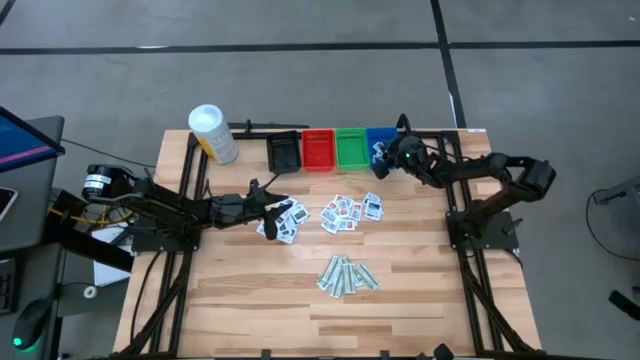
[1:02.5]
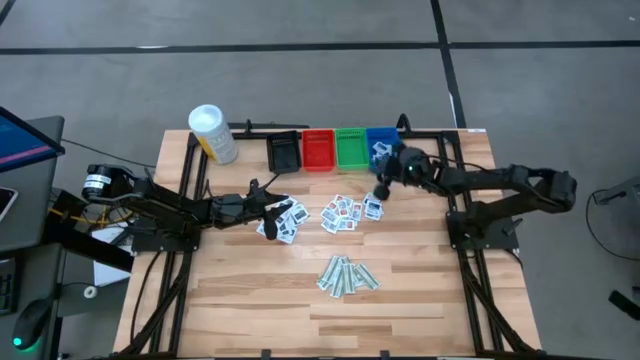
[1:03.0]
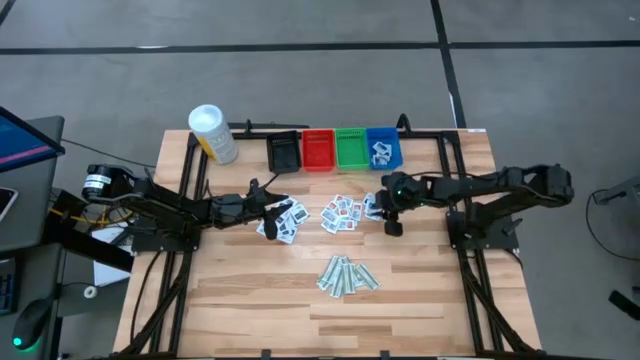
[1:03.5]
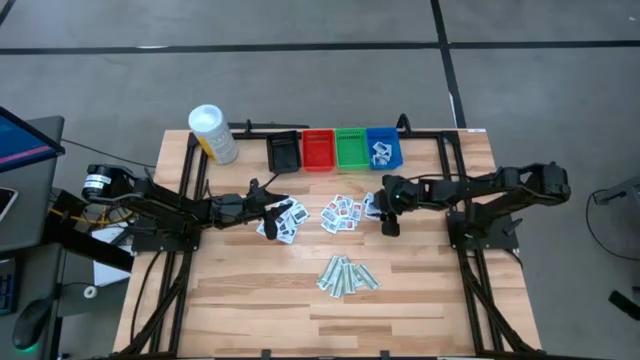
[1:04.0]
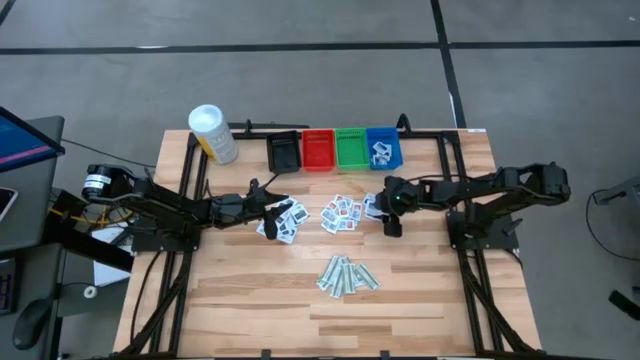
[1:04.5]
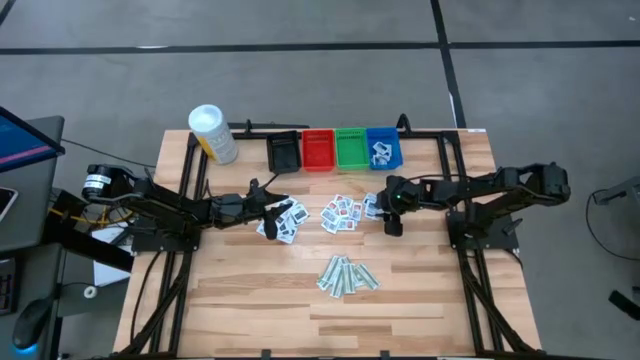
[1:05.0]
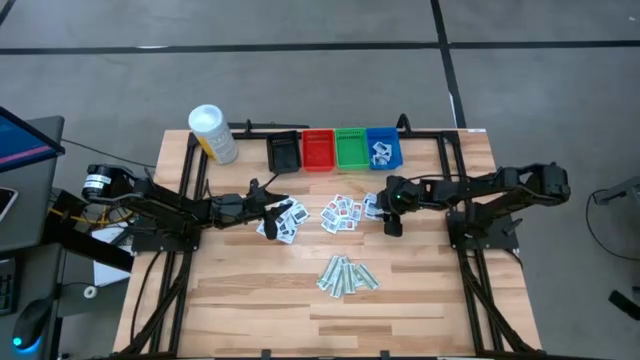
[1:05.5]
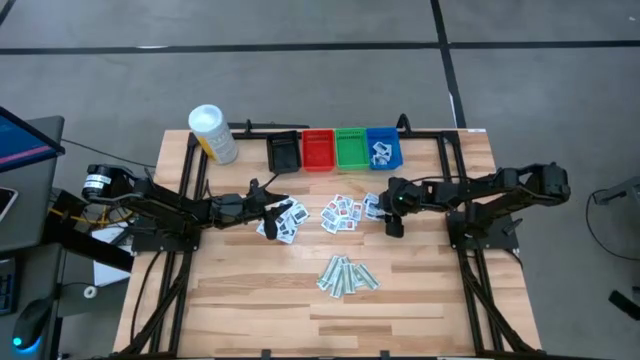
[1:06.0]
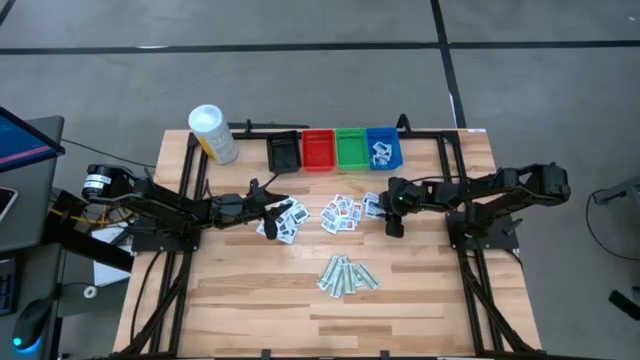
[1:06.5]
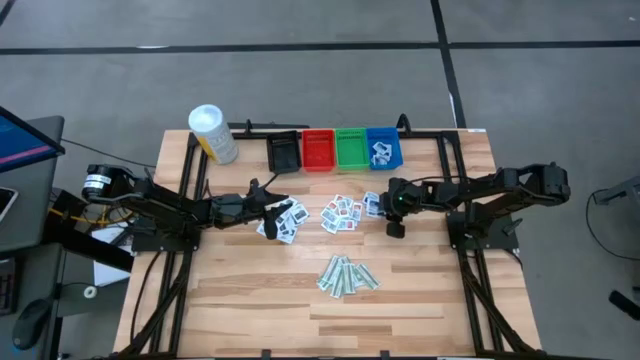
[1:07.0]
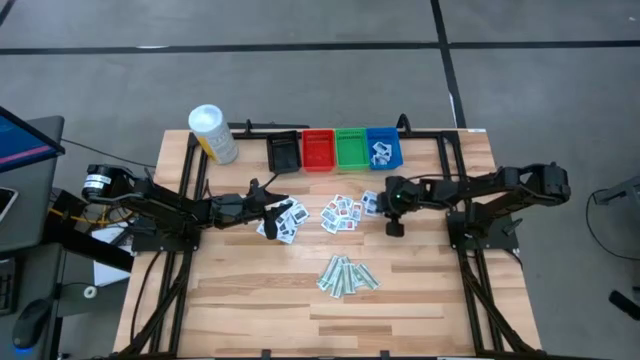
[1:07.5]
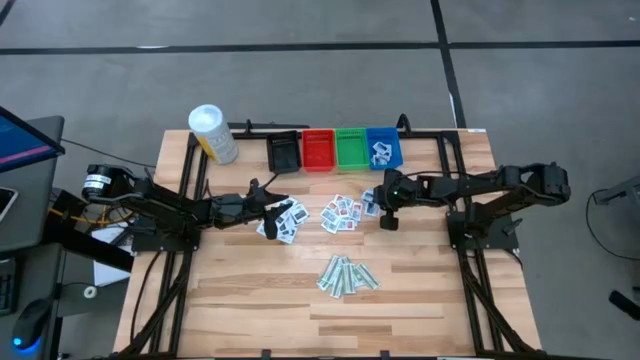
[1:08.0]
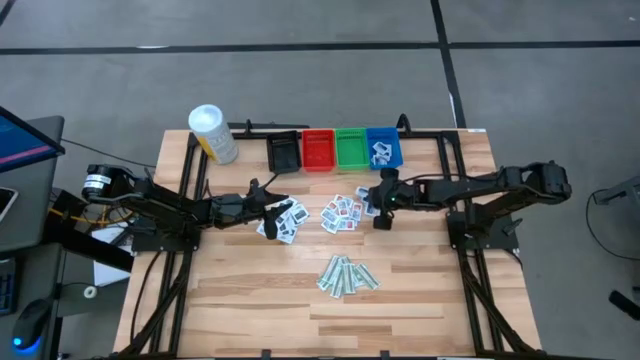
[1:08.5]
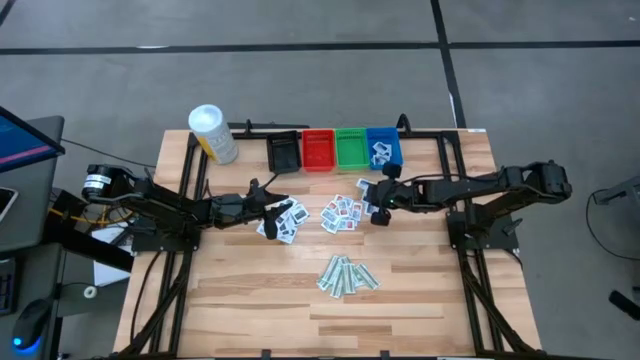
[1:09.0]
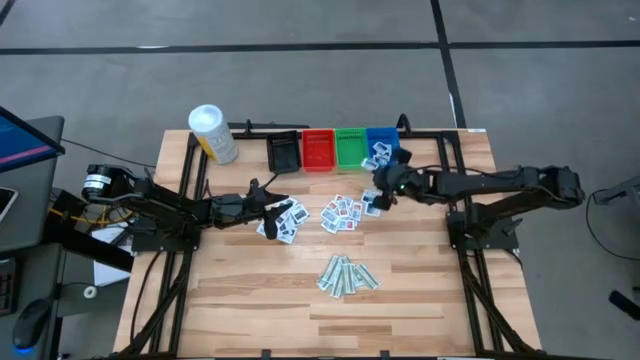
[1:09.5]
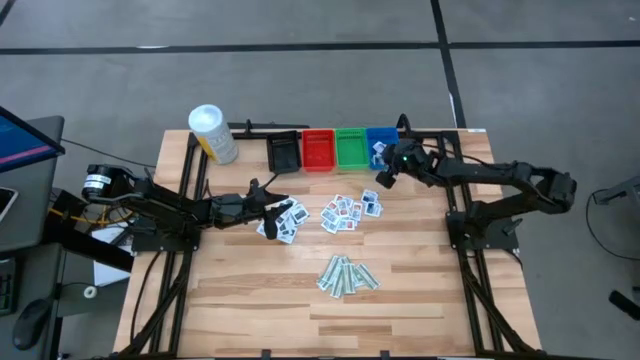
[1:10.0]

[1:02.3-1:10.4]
Task: Pick & Place First Aid Supplies
Put the blue alcohol pad into the blue bin

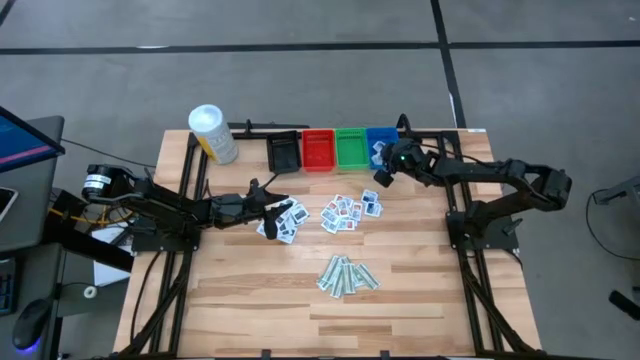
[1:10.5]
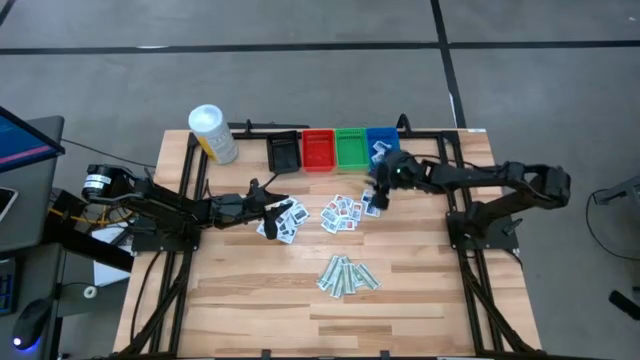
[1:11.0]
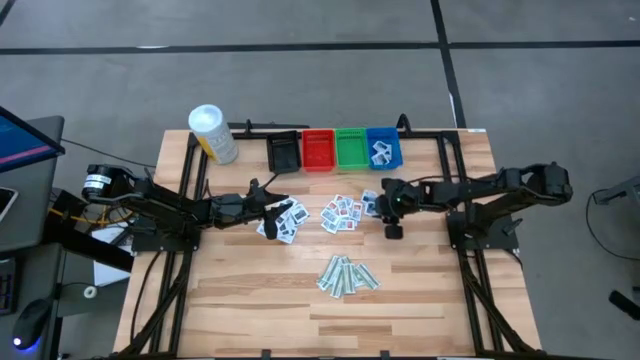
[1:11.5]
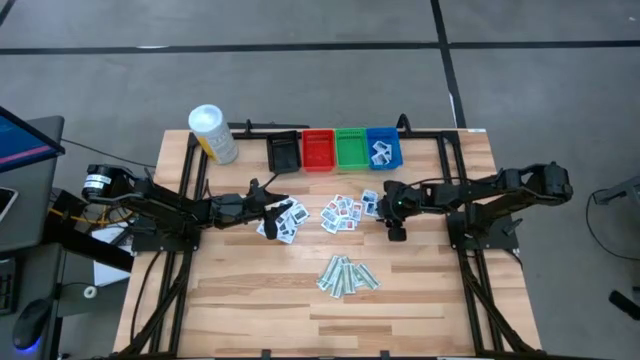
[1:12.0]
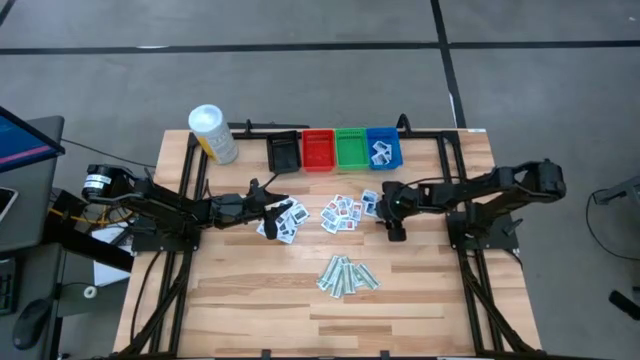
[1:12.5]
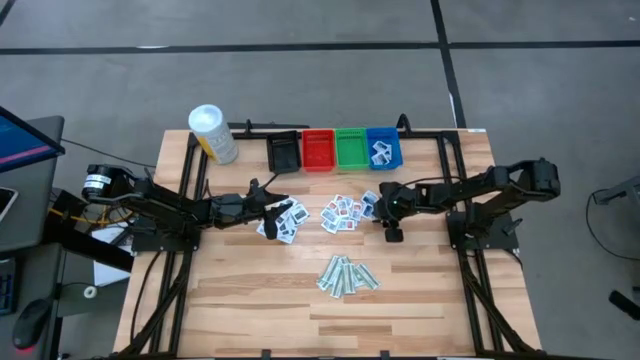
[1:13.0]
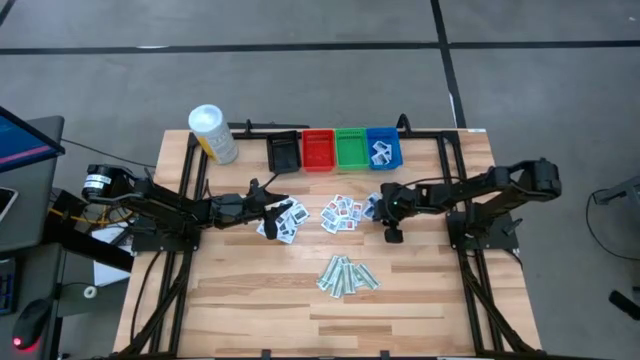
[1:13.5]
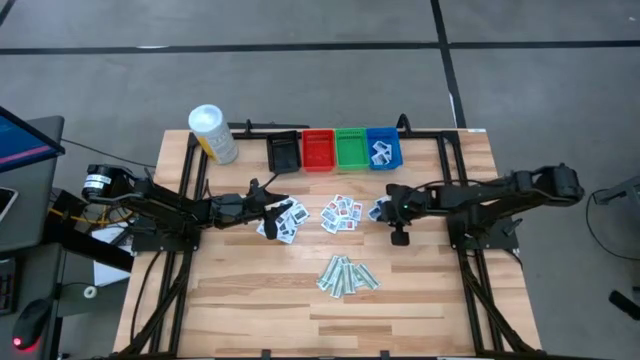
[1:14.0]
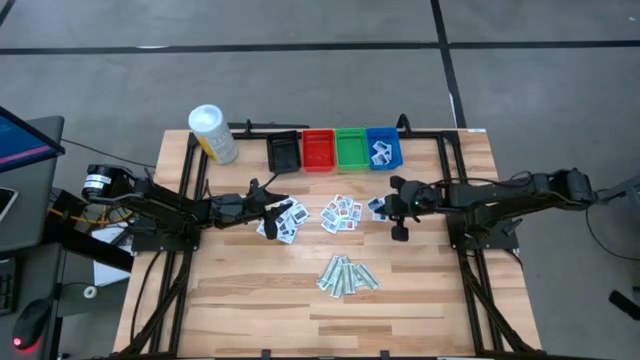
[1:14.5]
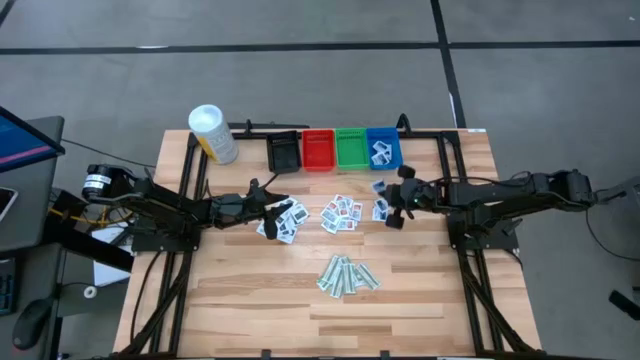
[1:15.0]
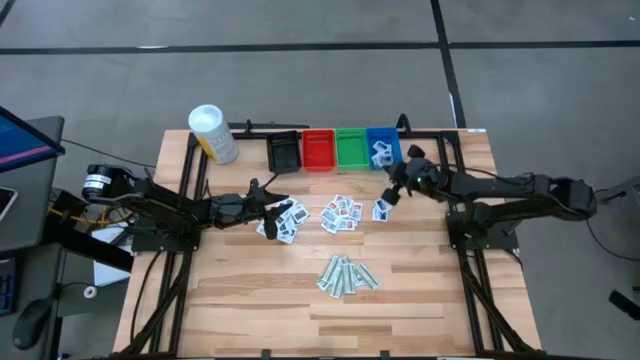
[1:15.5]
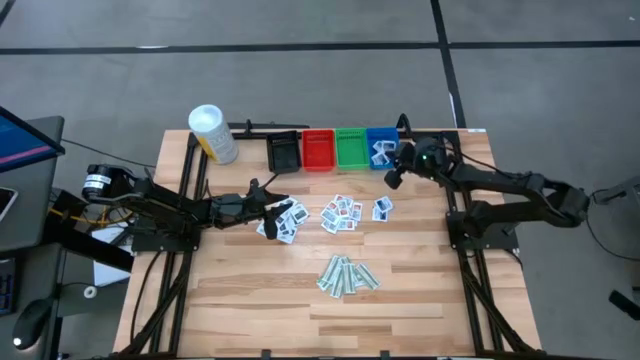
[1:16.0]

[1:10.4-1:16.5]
Put the blue alcohol pad into the blue bin

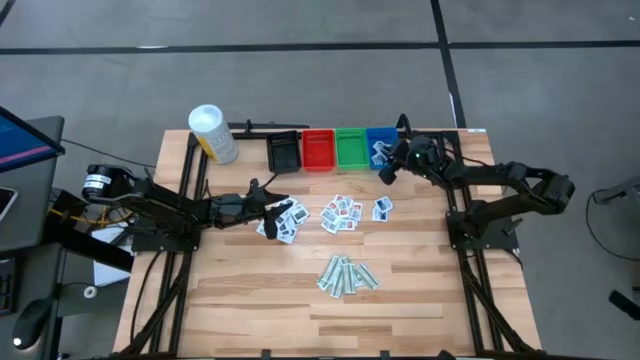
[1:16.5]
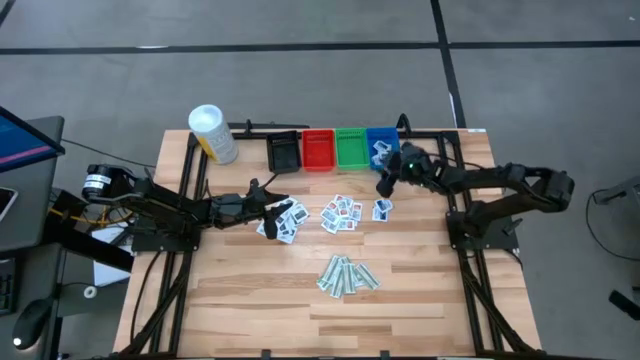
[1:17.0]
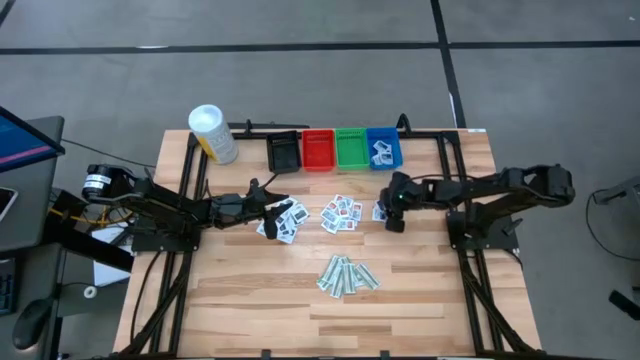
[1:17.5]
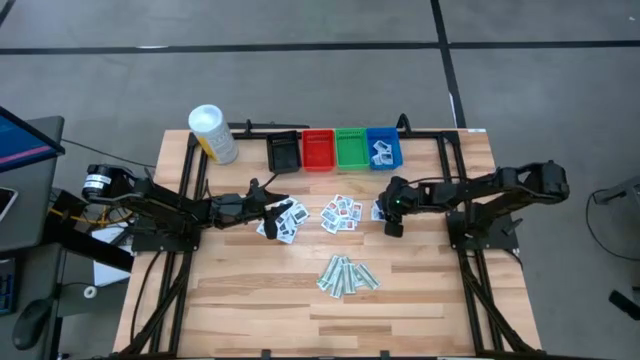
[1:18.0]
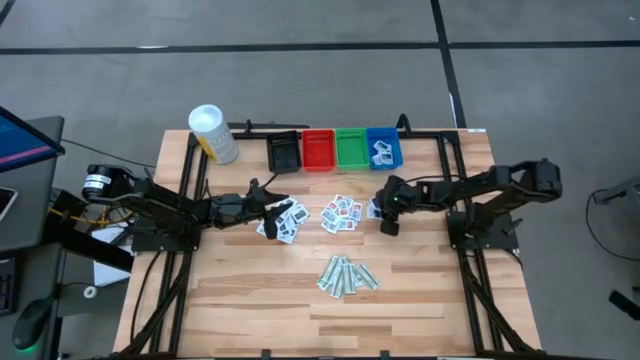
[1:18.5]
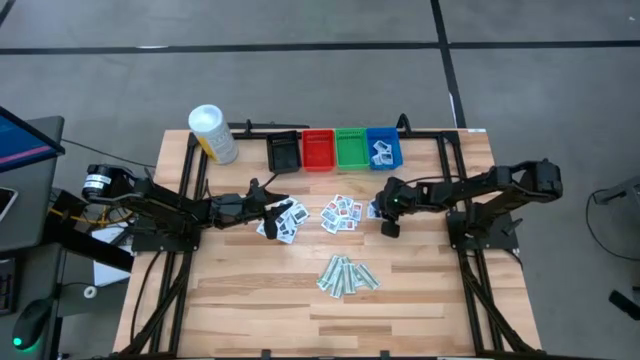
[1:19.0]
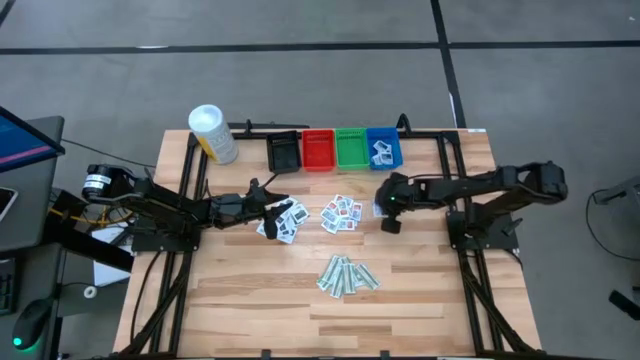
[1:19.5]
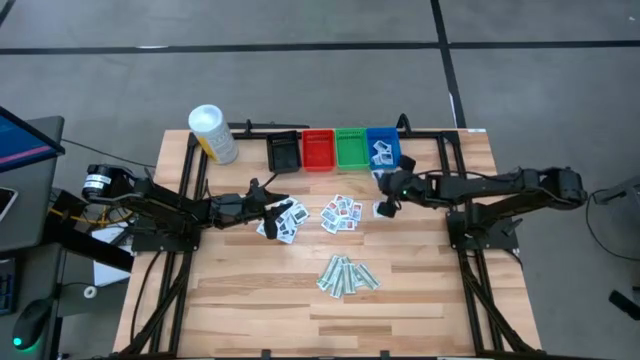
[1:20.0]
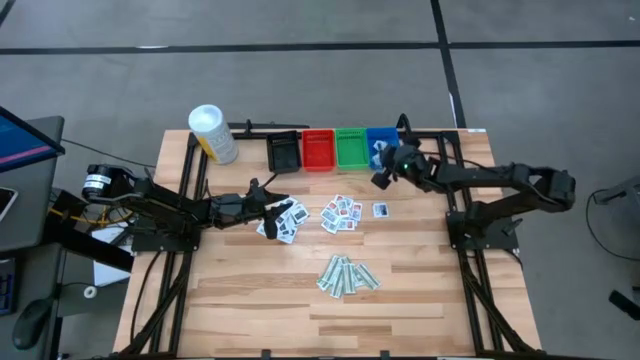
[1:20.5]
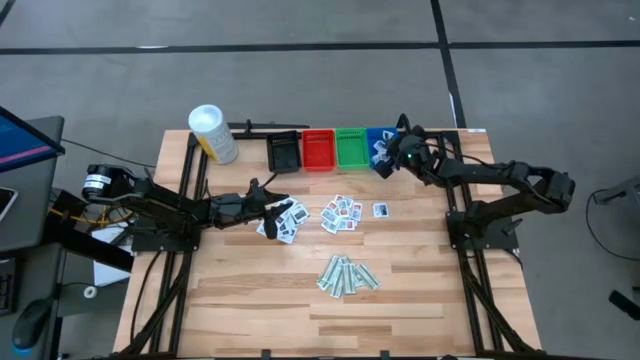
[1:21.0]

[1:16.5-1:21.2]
Put the blue alcohol pad into the blue bin

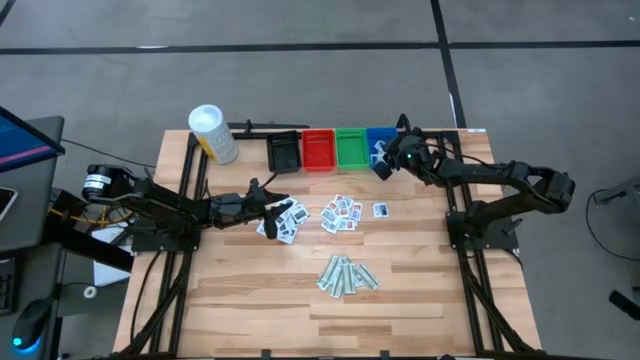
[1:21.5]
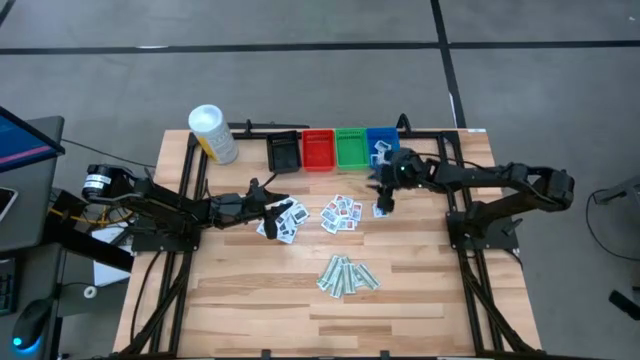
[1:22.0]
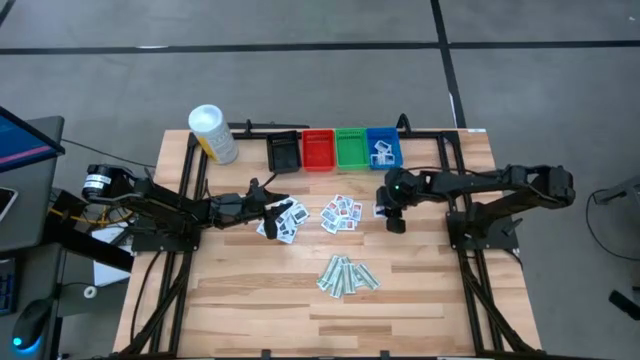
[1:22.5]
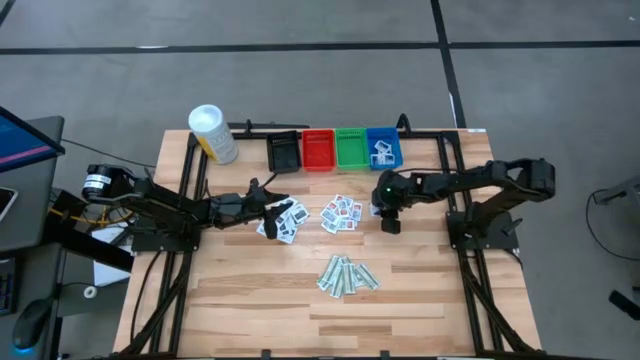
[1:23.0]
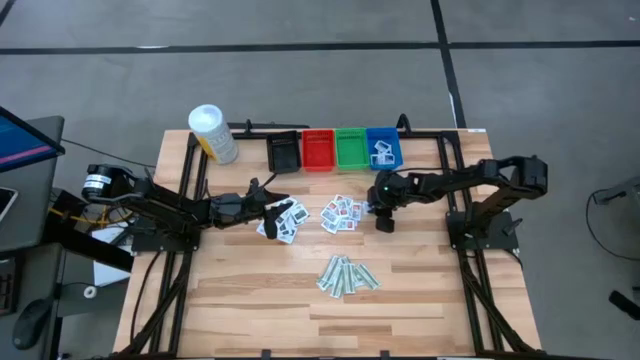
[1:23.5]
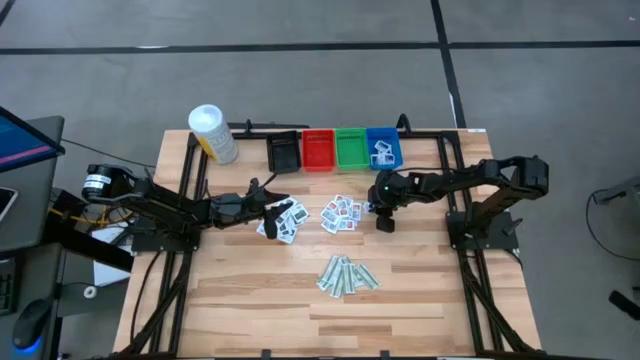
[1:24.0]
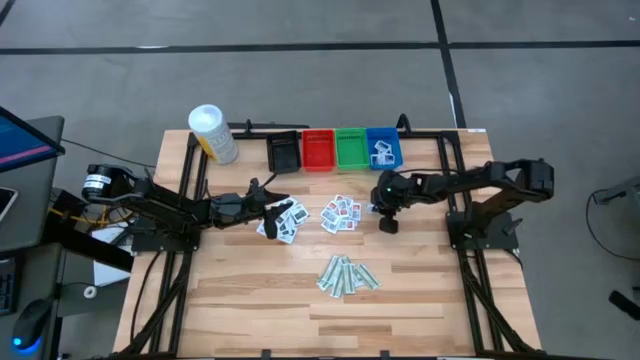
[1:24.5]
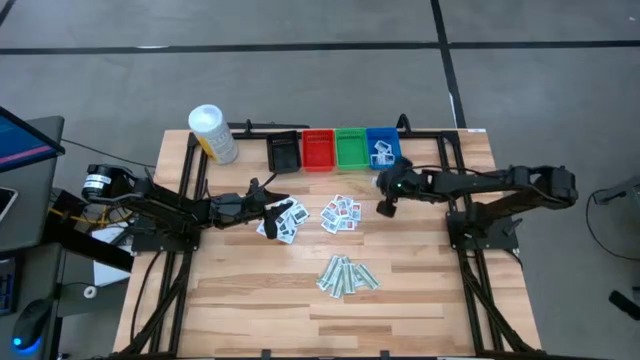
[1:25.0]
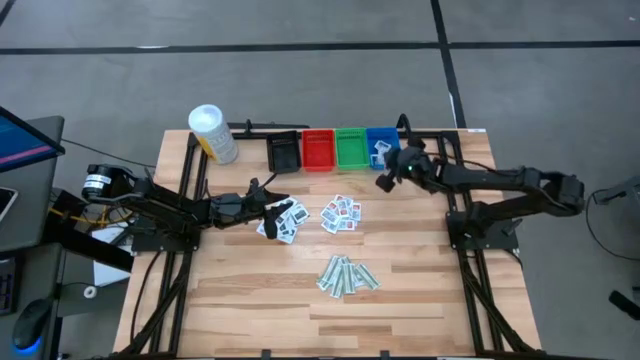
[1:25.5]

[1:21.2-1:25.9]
Put the blue alcohol pad into the blue bin
